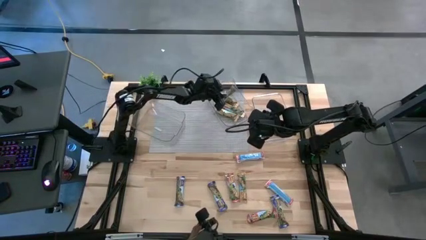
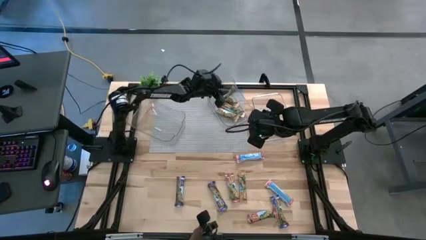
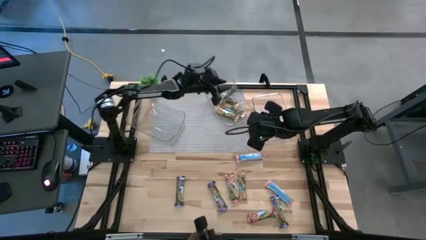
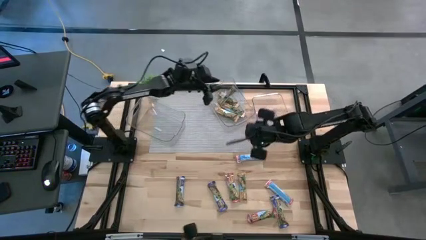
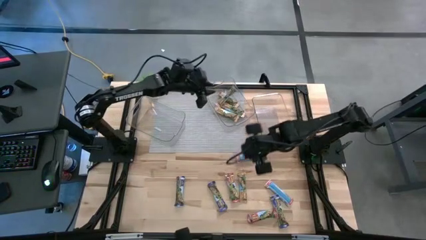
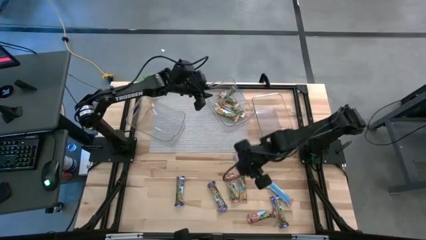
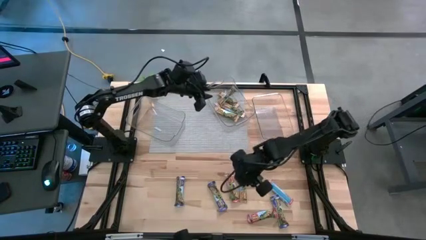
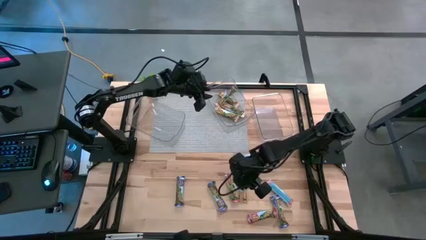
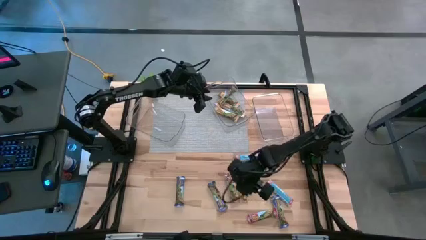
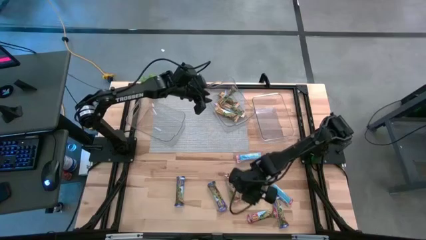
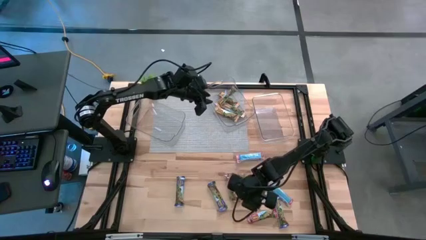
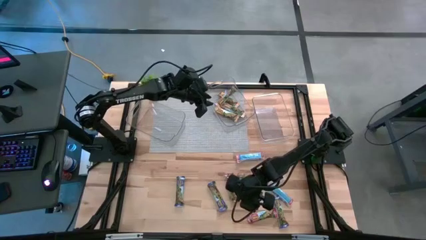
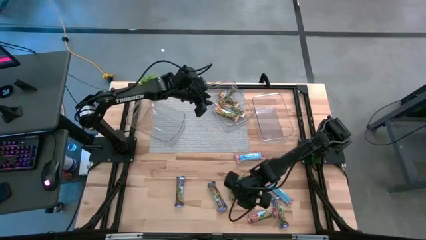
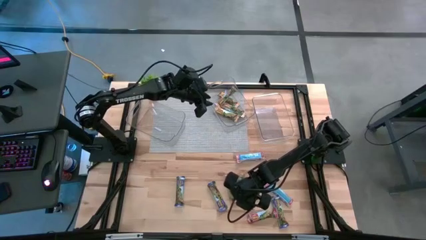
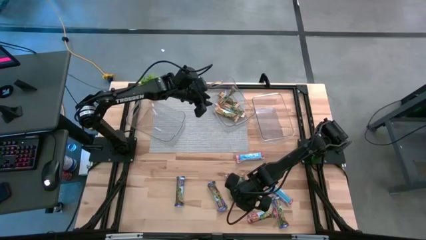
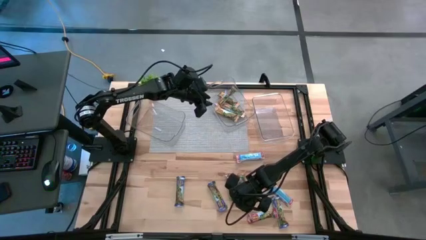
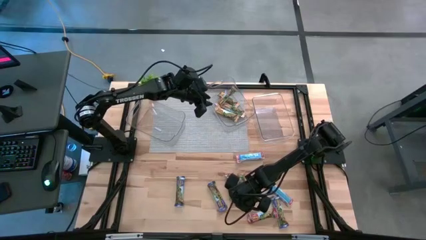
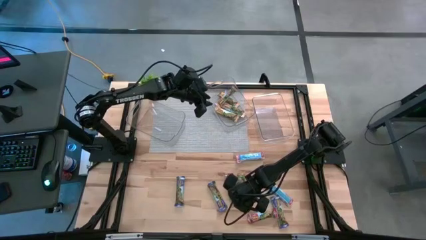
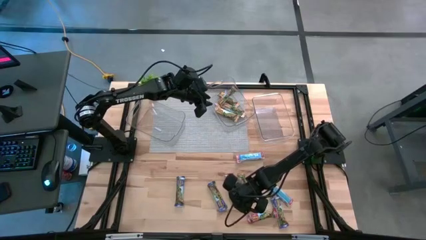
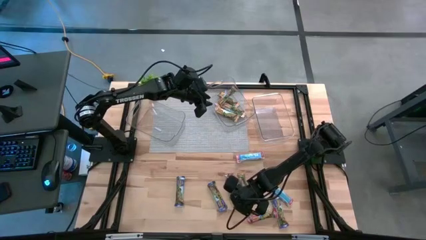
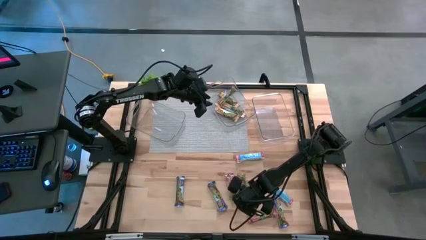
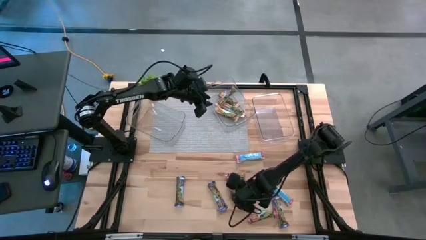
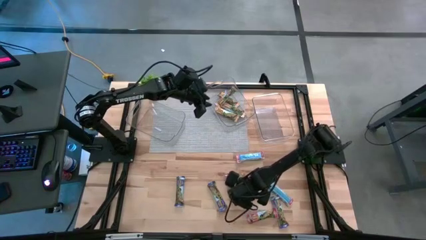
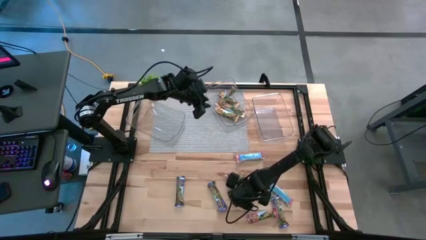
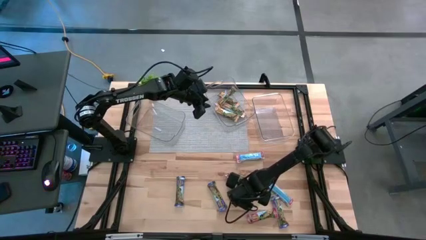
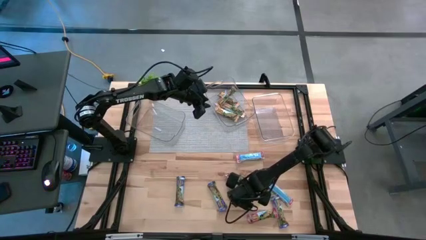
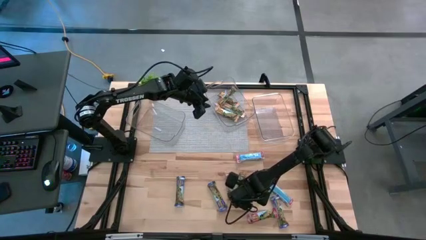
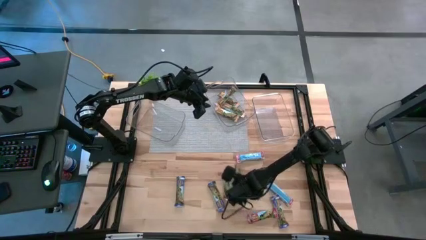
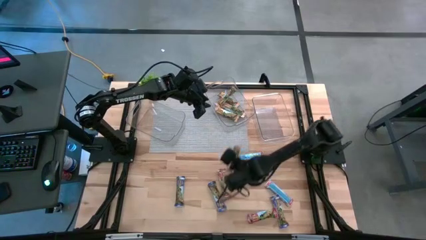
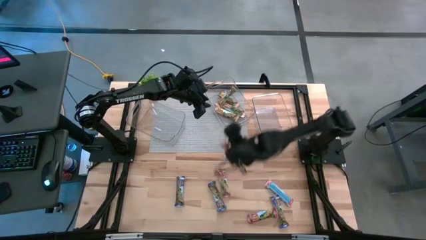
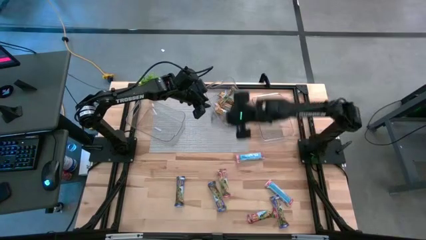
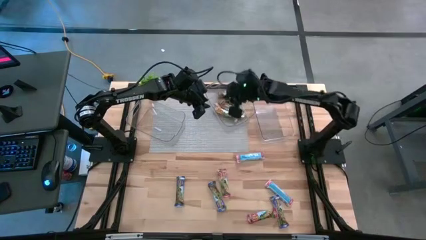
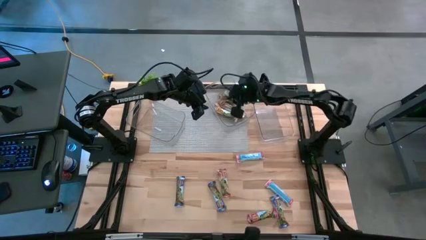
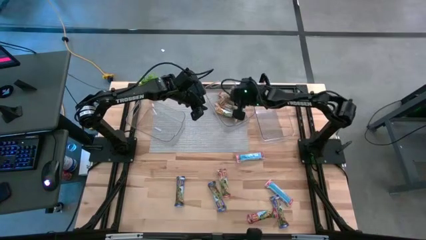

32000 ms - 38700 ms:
Task: Pick and place Granola Bars by type
Put the yellow granola bar into the middle transparent bin

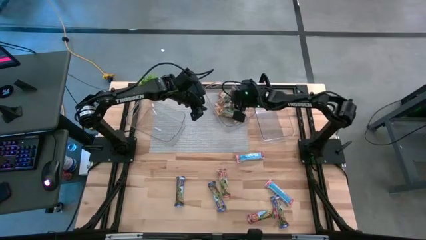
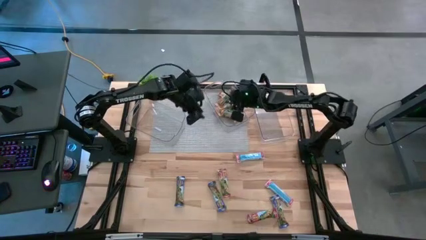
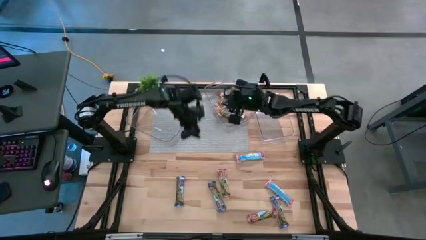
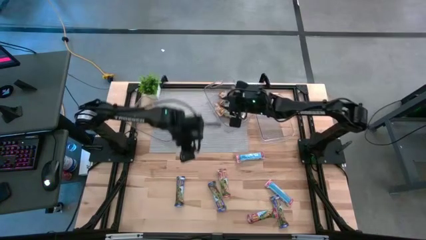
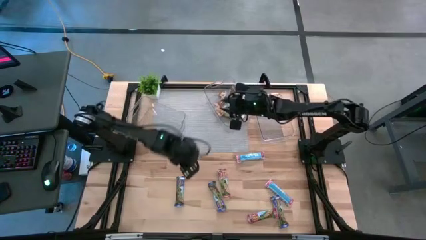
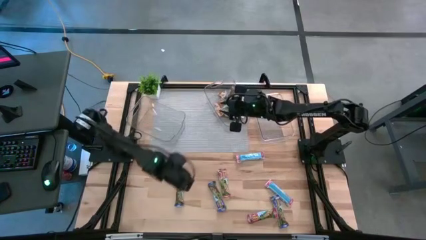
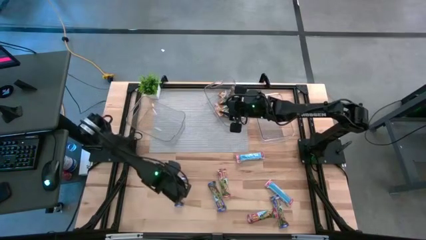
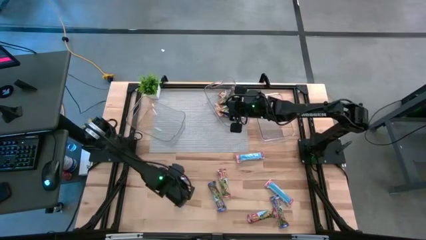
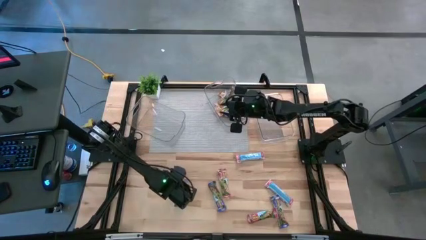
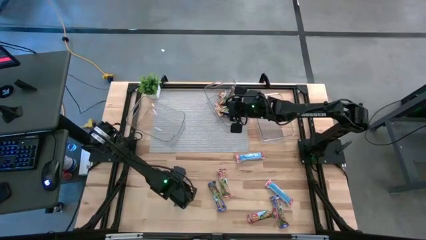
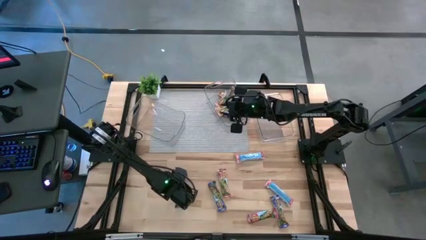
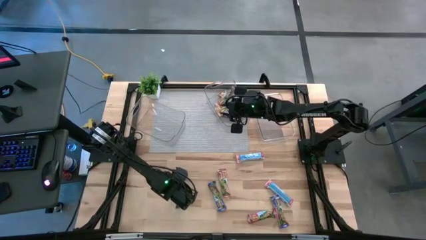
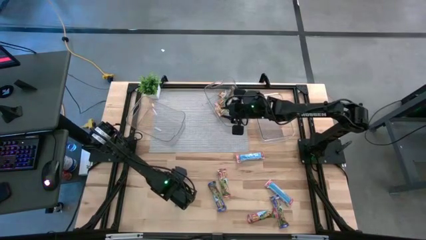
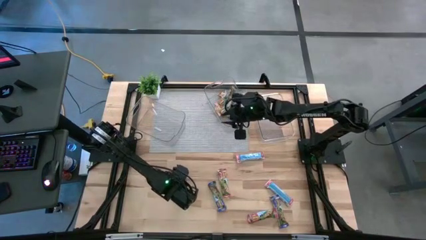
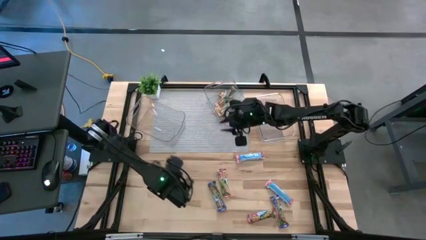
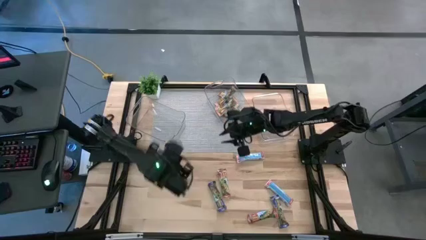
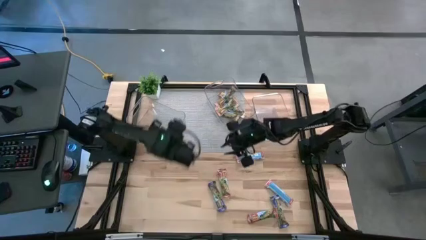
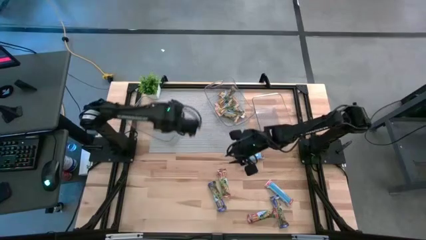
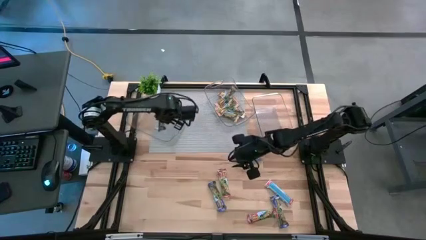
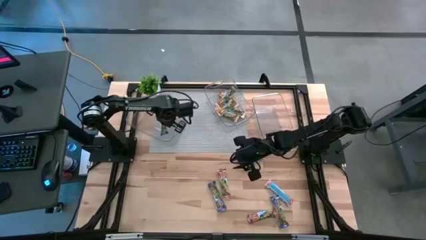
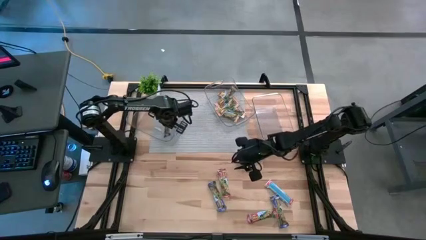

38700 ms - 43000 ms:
Put the blue granola bar into the left transparent bin

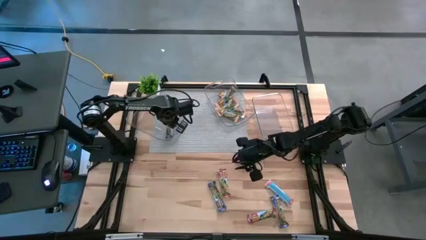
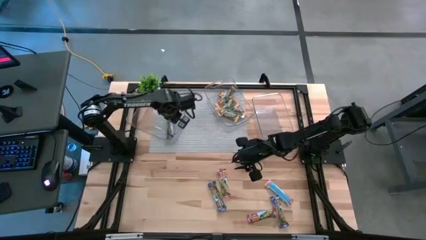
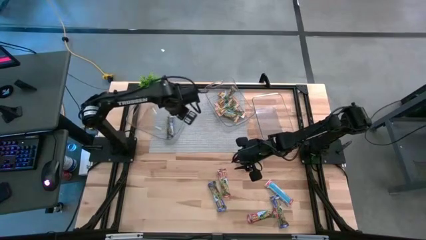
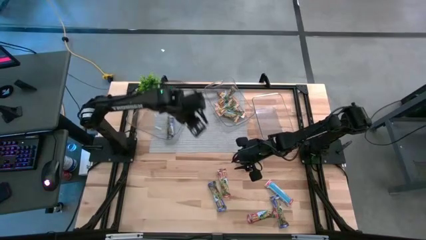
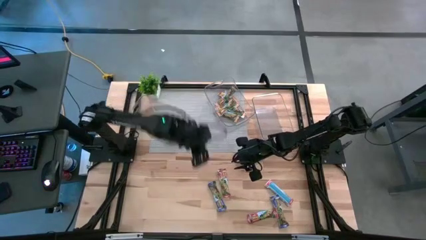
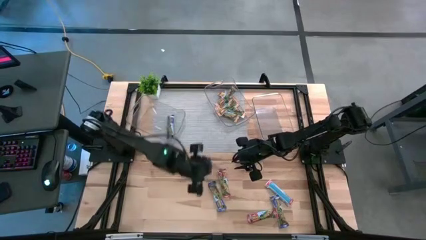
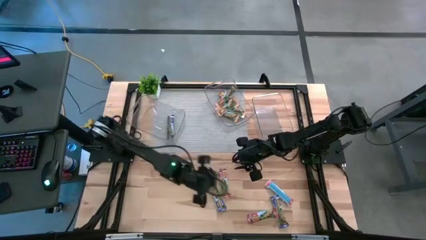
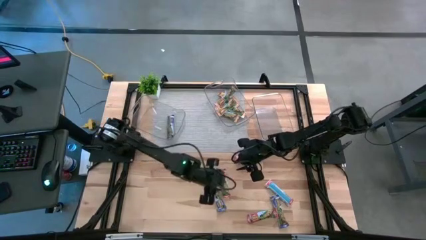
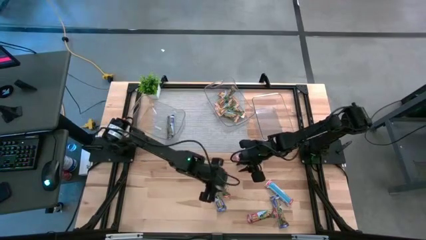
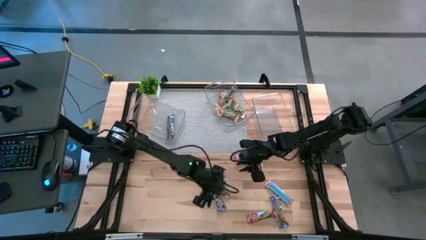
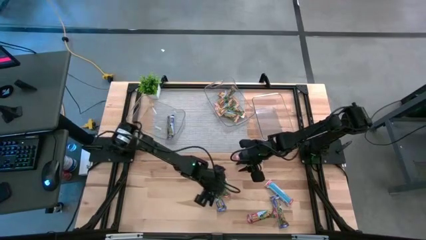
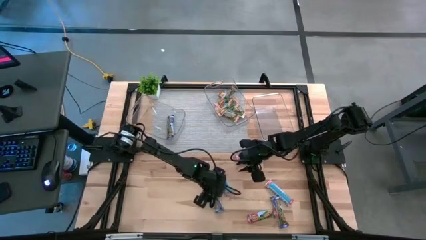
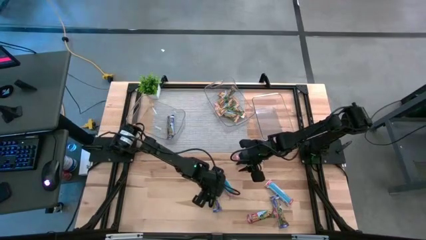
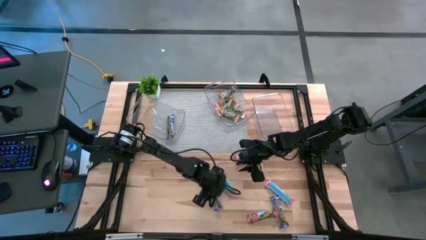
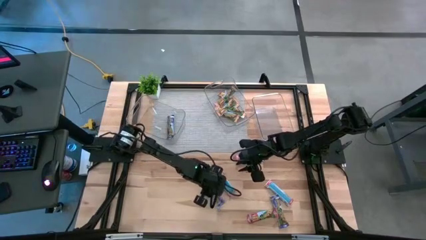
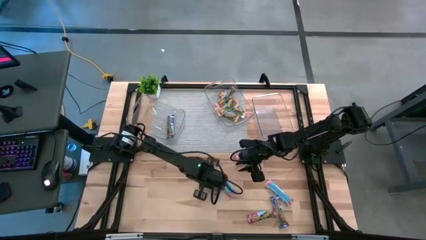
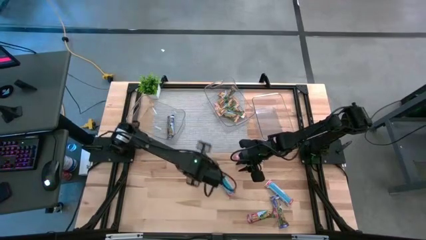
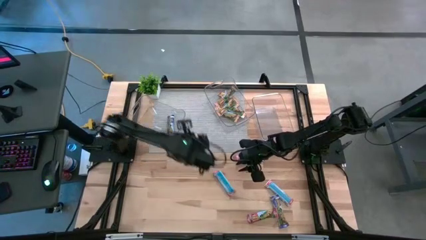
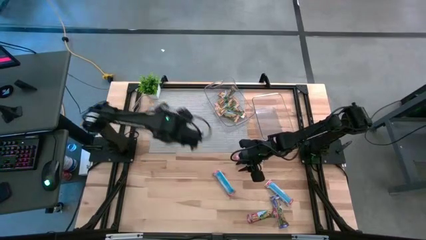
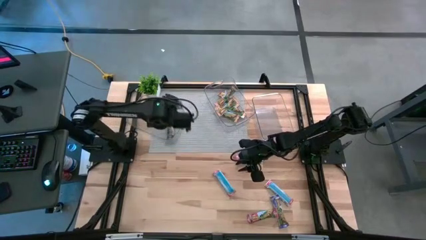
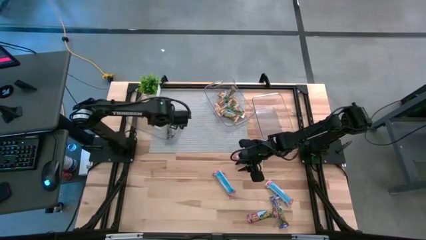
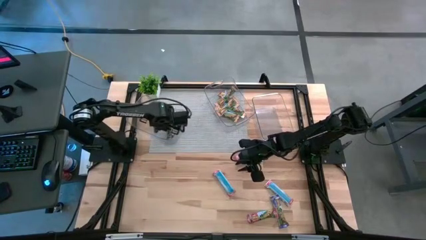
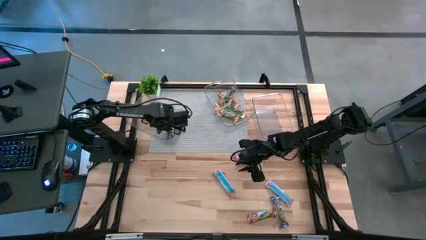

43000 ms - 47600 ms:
Put the blue granola bar into the left transparent bin

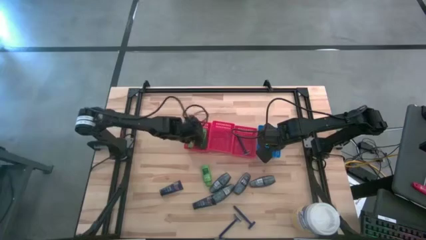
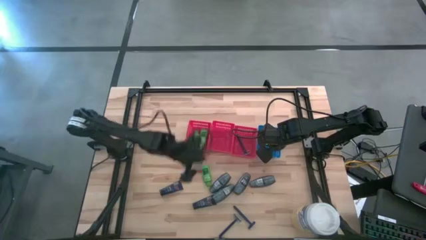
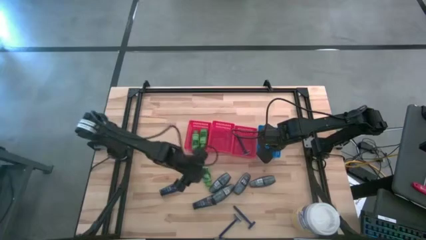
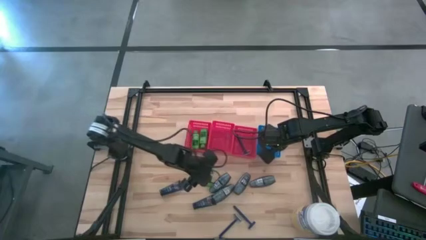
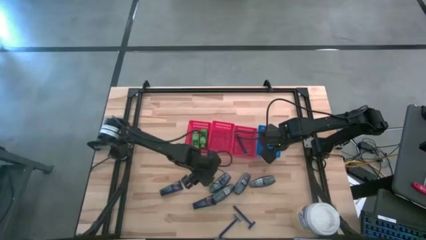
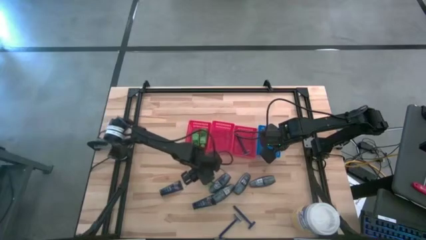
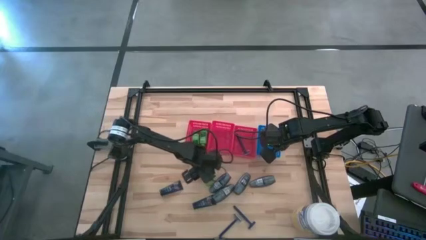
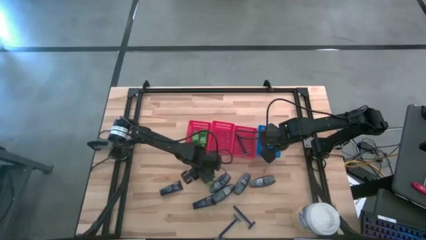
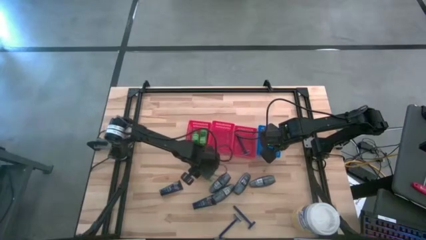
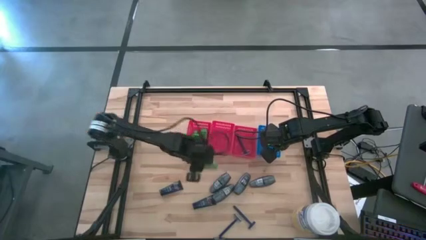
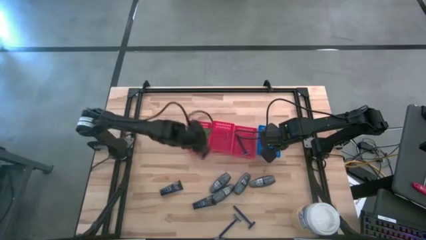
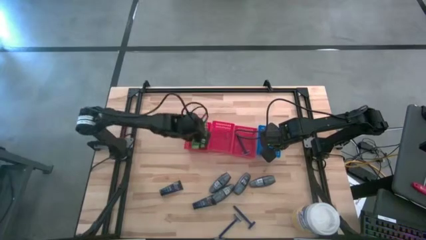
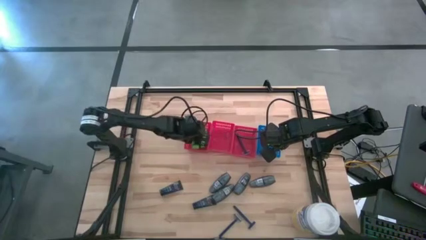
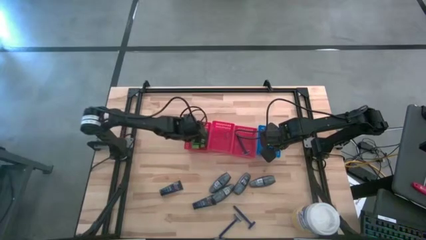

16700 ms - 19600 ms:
Task: Pick & Place Travel size toiletries
Put the green shampoo in the left red bin
